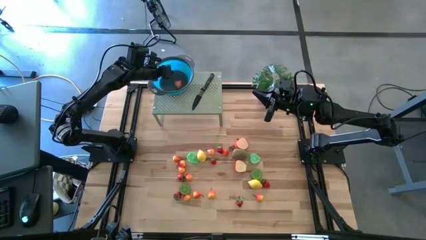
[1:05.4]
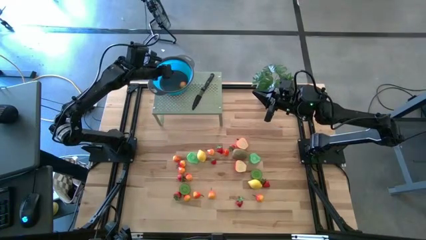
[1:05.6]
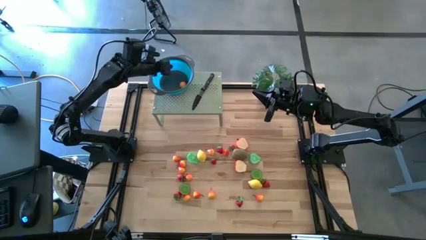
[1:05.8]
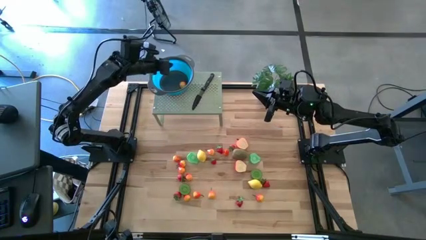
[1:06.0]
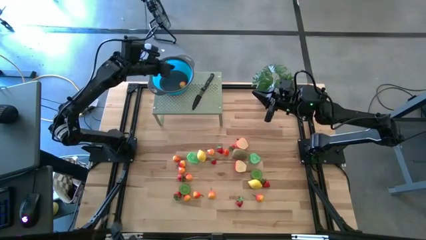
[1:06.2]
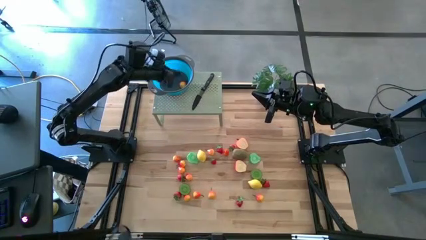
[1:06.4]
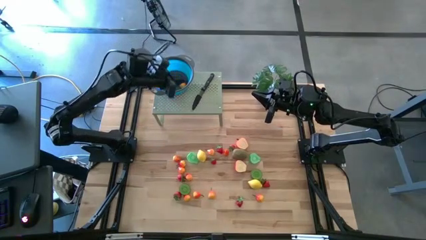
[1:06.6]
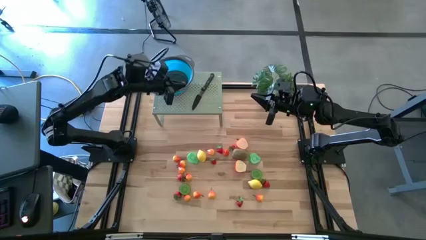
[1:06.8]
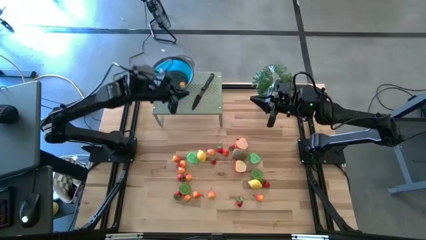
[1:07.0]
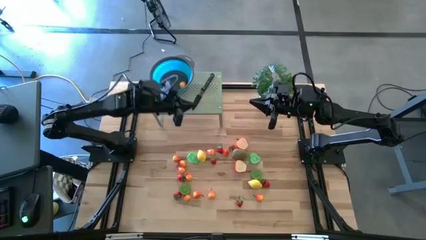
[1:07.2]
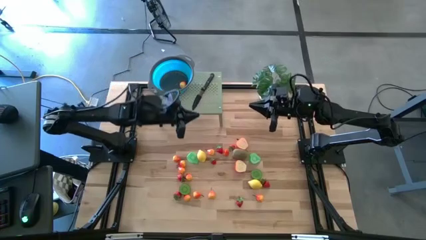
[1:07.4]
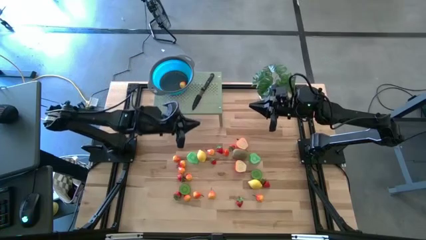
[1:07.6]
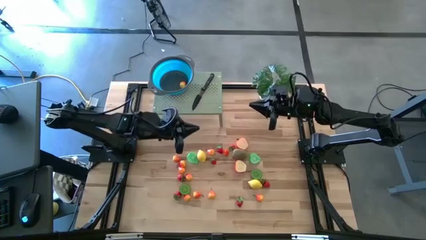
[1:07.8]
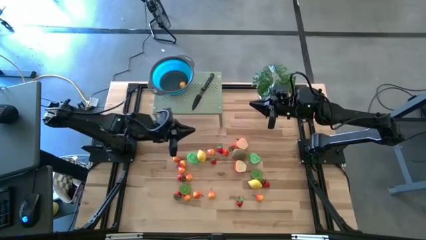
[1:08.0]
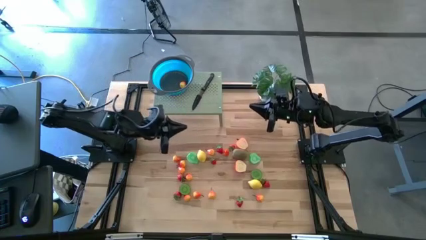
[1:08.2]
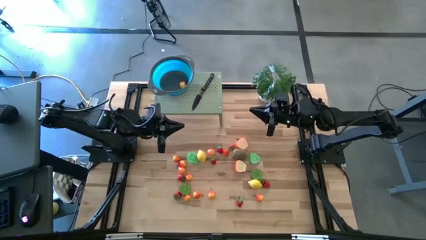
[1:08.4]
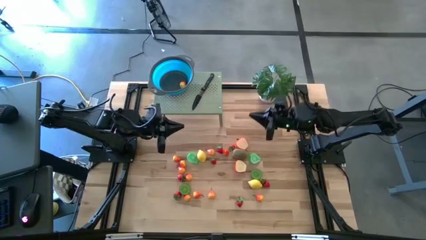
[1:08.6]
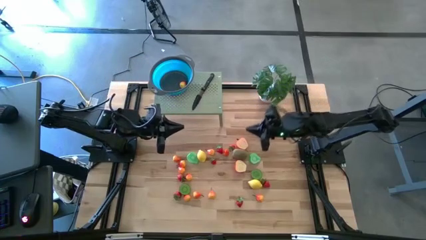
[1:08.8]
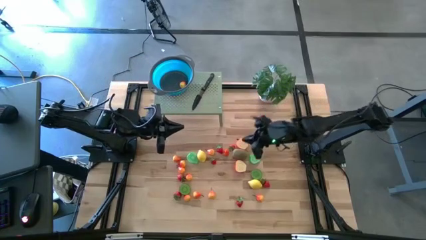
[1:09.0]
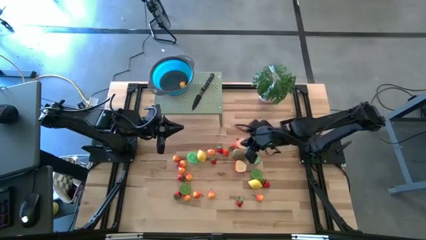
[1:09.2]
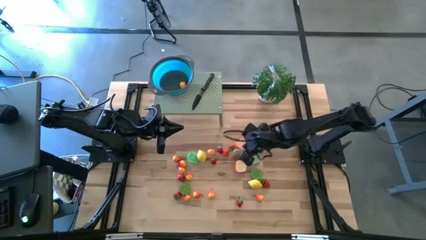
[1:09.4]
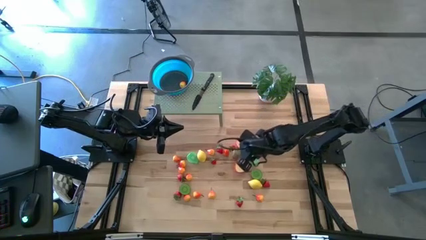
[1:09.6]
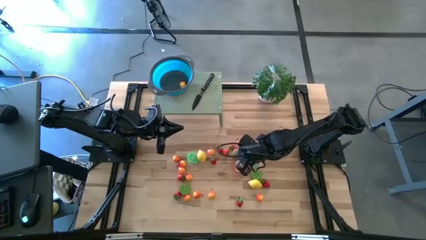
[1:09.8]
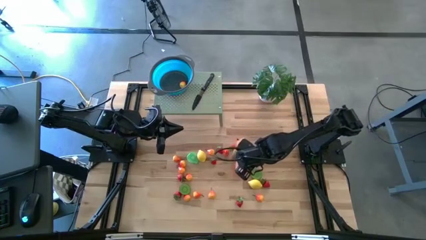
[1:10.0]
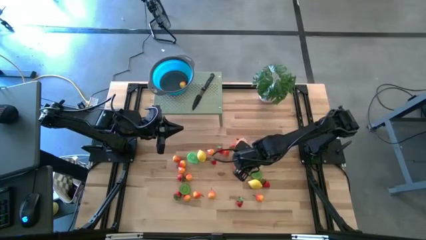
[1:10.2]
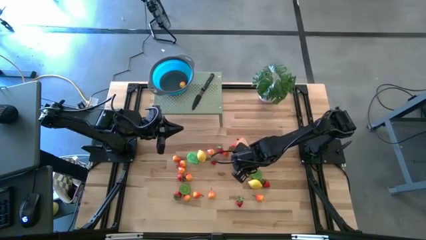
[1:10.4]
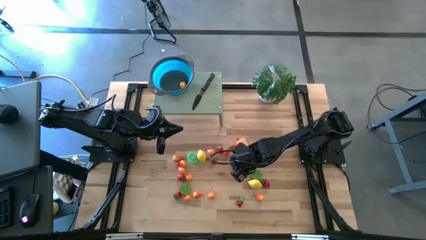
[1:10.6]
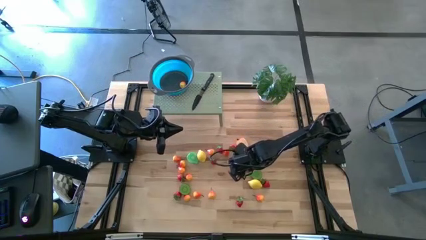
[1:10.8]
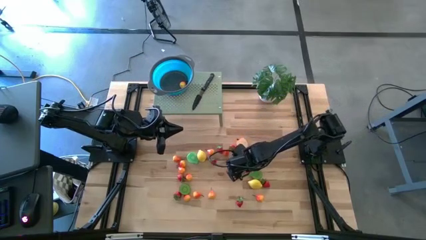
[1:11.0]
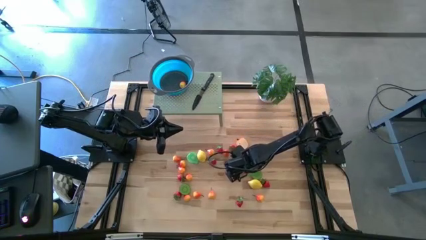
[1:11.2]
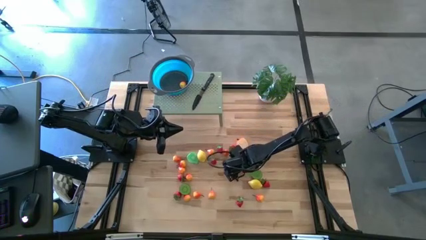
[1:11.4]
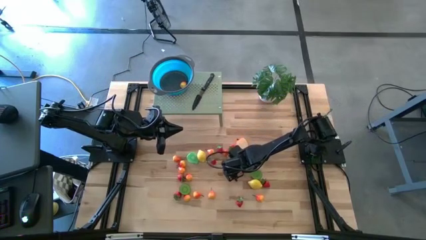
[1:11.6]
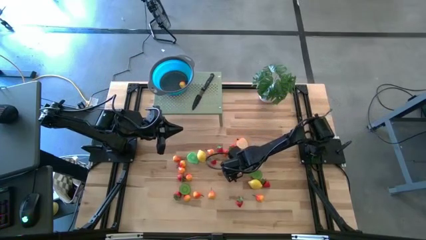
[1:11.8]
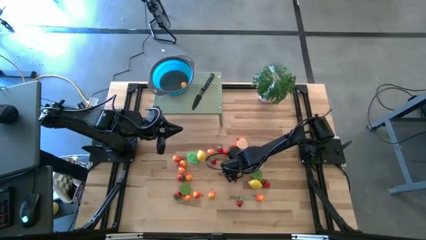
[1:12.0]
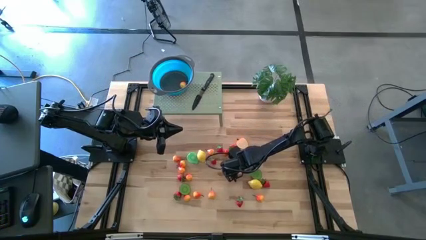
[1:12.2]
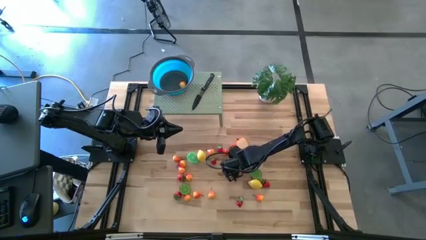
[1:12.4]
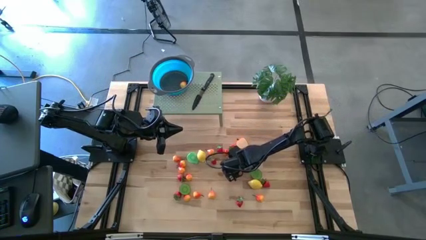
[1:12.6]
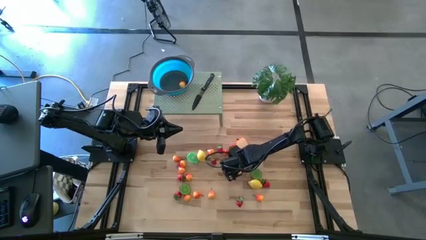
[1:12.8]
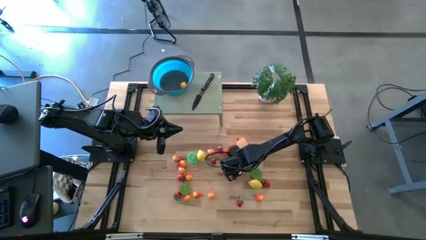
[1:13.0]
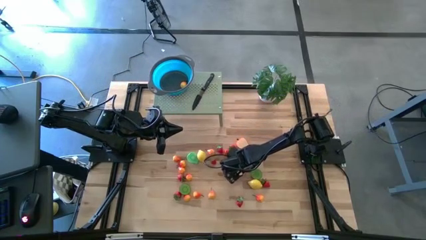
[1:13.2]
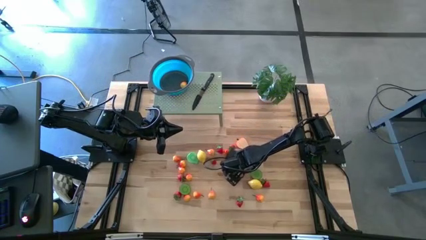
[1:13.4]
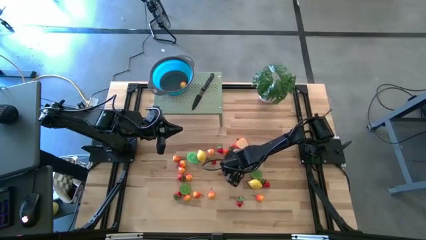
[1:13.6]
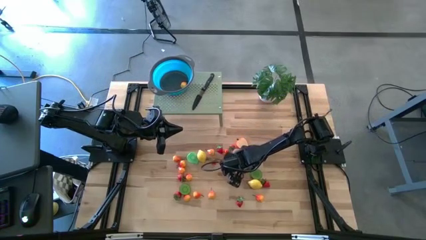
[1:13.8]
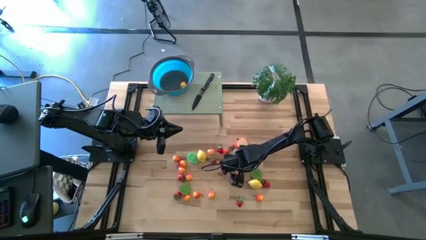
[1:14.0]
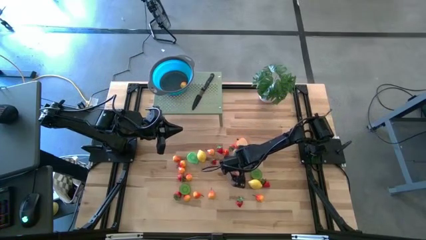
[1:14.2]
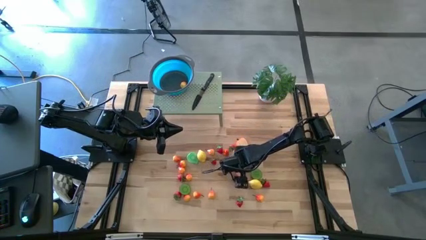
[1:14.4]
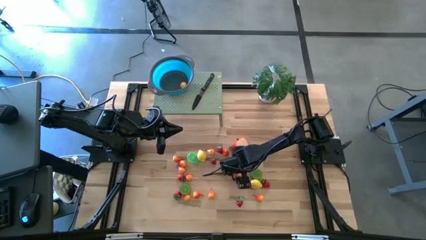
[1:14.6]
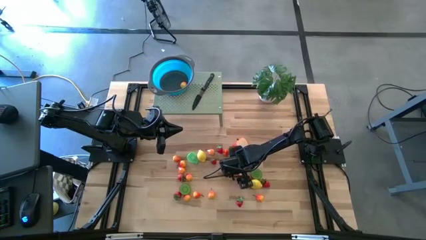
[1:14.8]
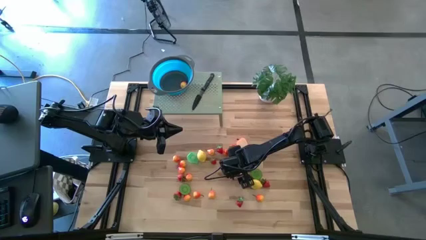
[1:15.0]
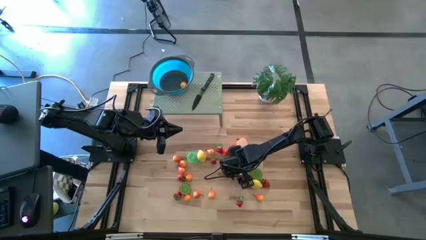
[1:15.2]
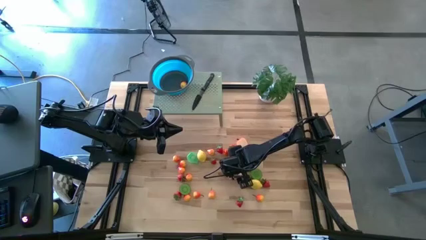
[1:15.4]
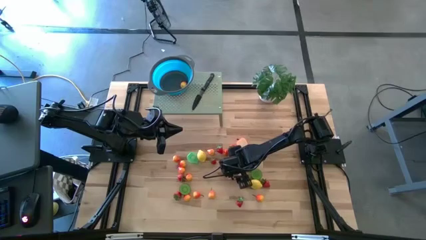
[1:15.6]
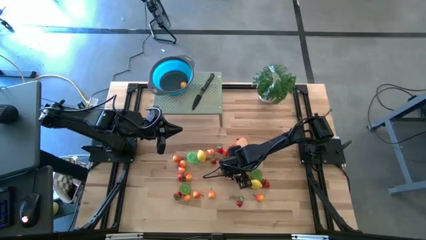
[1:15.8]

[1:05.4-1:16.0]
Task: Pick & Place Fruit
Put the half apple into the strainer bowl on the shelf

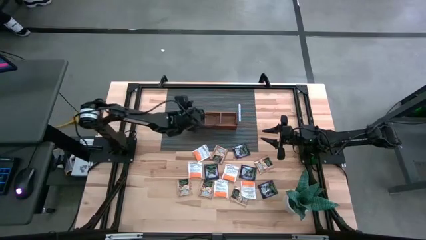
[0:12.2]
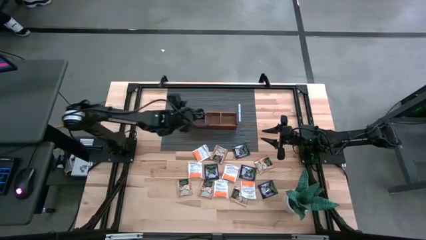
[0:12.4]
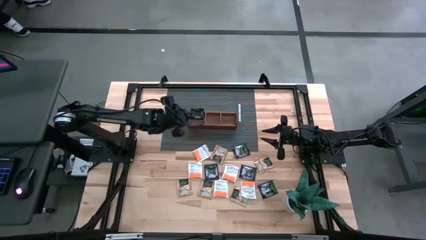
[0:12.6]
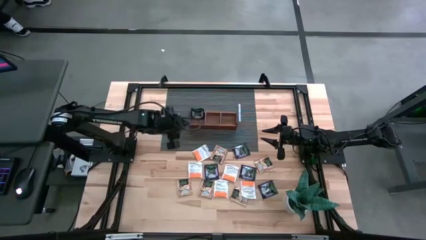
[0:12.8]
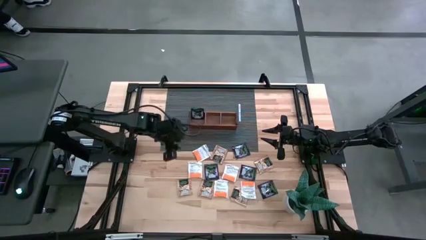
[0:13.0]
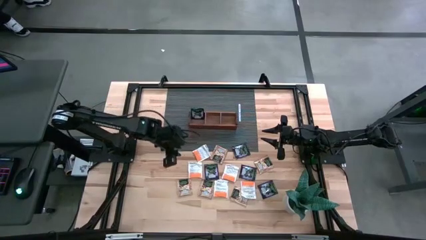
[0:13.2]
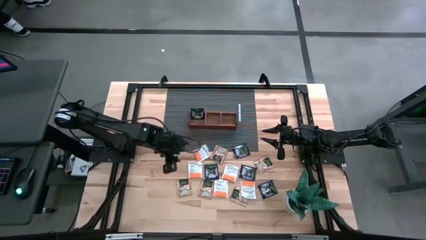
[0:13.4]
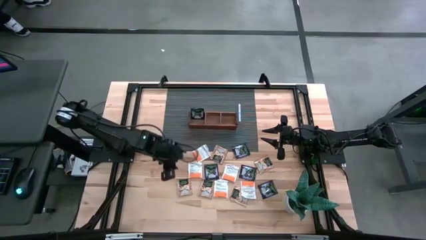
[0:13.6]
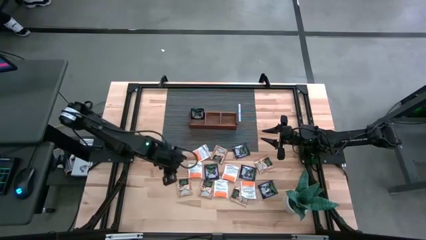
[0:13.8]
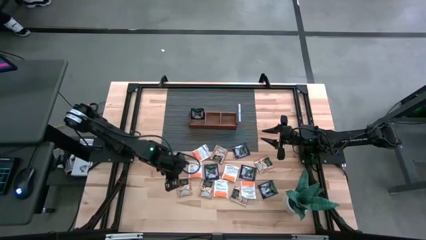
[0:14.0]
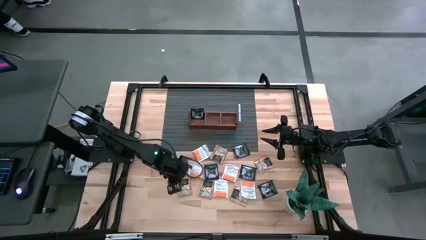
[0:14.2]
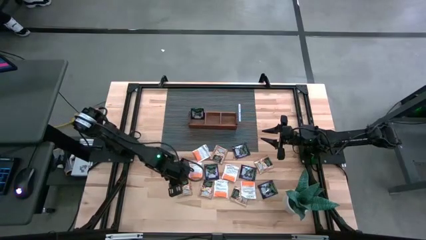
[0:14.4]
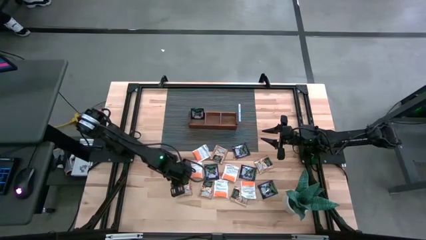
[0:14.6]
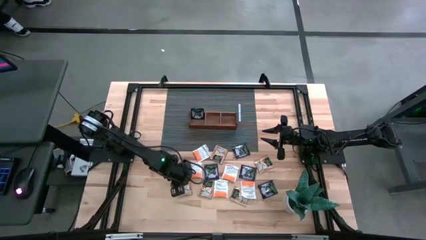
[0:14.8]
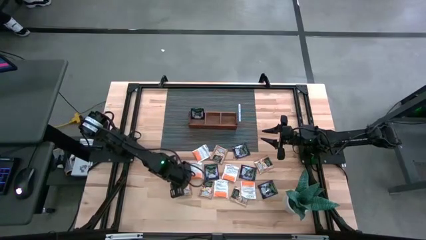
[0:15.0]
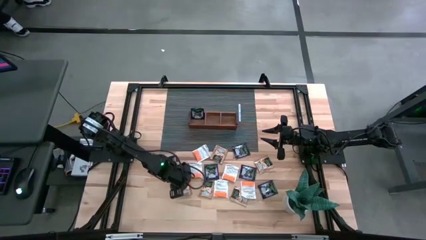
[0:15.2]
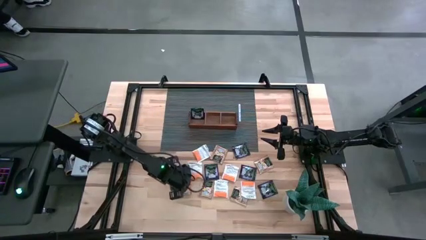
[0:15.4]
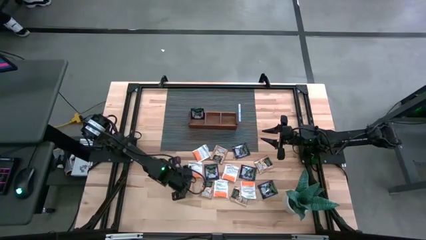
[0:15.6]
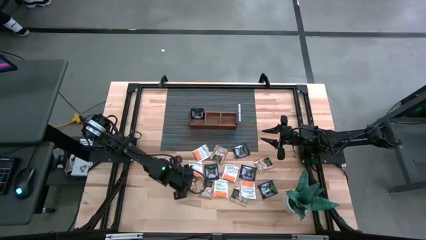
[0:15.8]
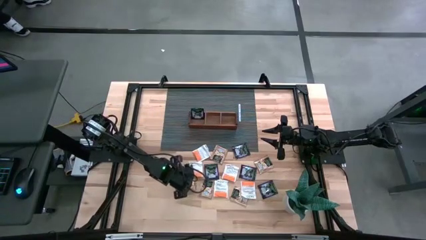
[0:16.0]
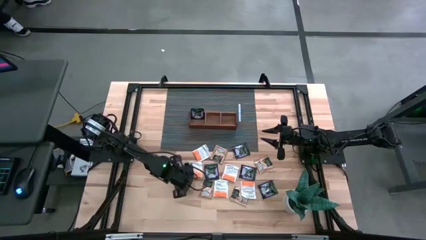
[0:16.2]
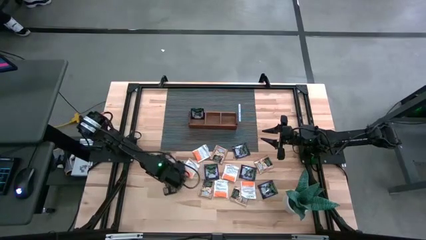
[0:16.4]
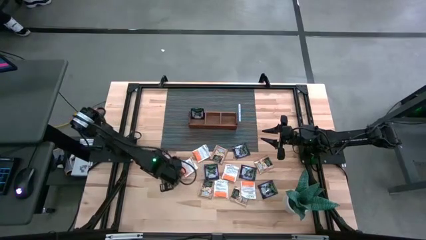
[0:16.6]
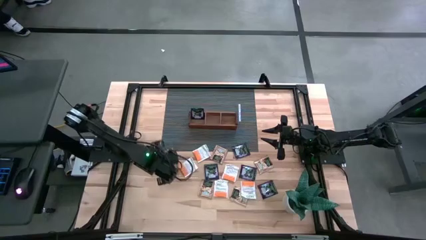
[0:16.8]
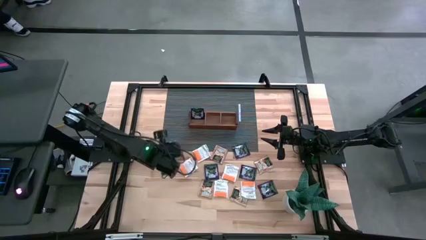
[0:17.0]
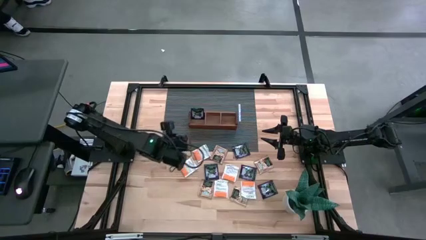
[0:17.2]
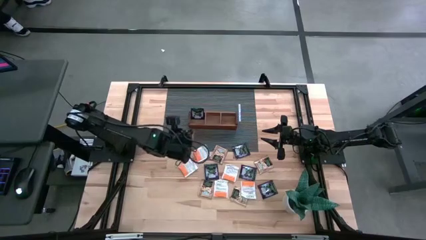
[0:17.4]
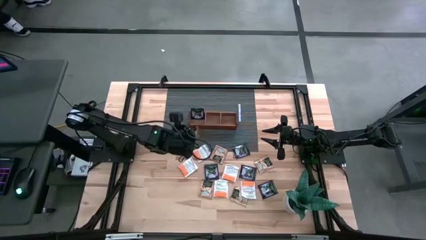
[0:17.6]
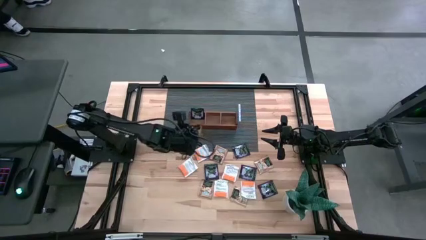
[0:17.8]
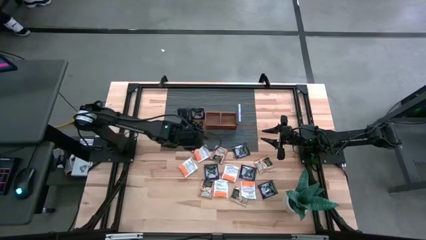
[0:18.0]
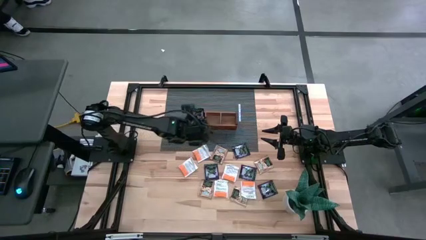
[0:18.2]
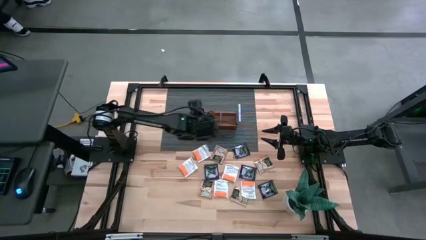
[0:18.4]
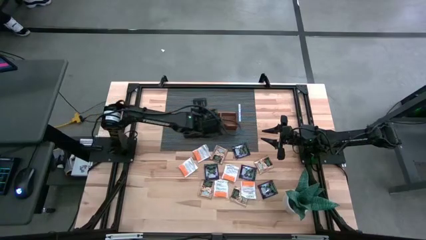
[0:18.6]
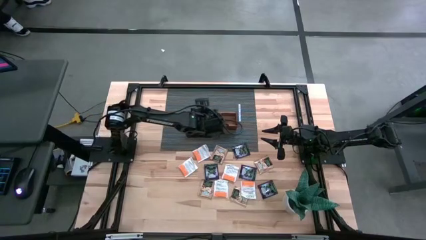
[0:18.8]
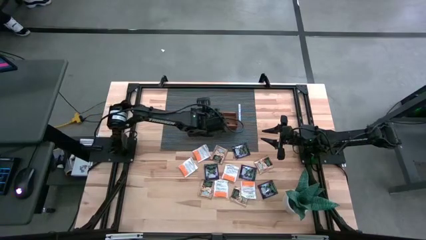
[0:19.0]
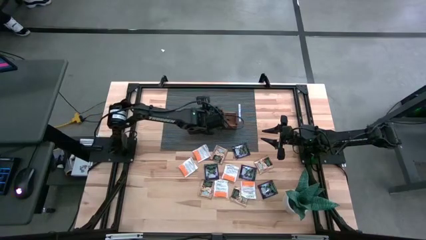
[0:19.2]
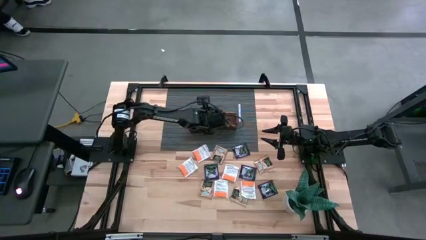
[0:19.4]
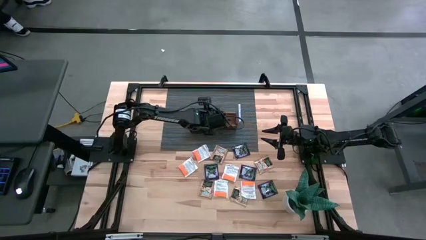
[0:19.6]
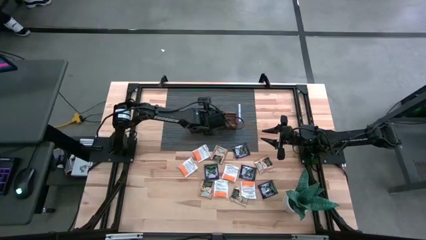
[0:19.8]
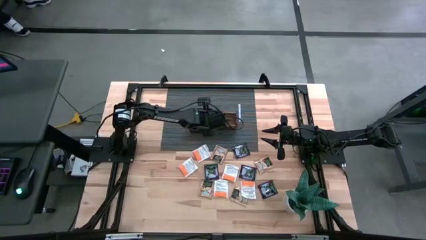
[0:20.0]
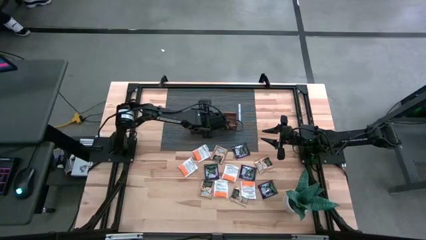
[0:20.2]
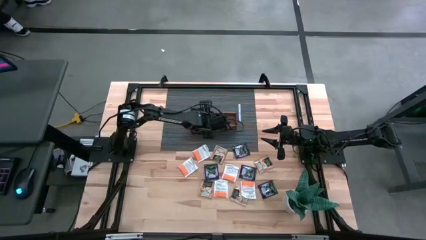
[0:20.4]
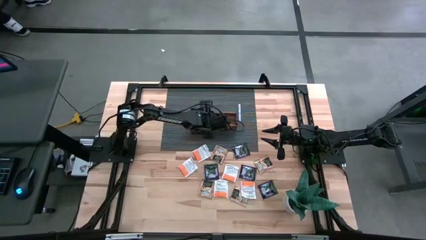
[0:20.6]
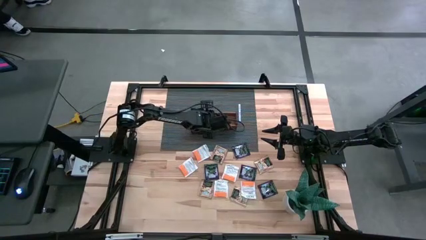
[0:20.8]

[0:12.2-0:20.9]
Task: Pick & Place Tea
Put the brown tea bag into the middle section of the wooden organizer
